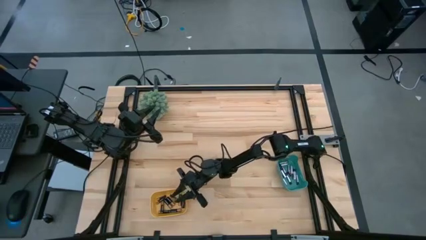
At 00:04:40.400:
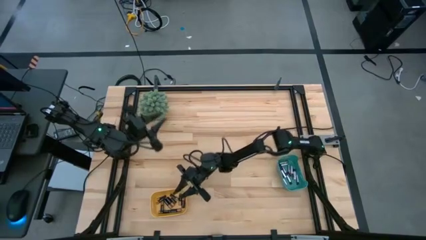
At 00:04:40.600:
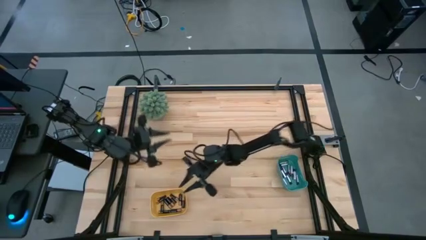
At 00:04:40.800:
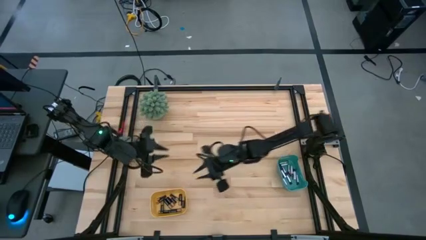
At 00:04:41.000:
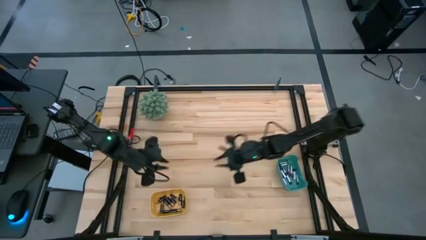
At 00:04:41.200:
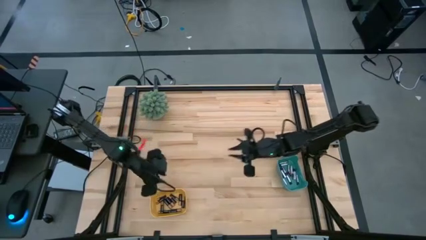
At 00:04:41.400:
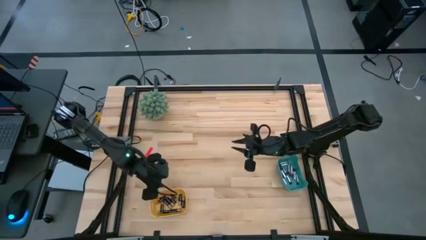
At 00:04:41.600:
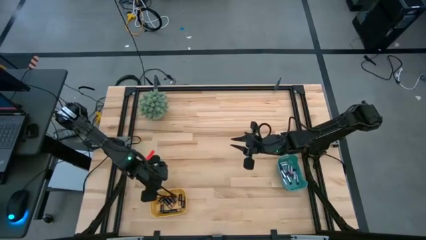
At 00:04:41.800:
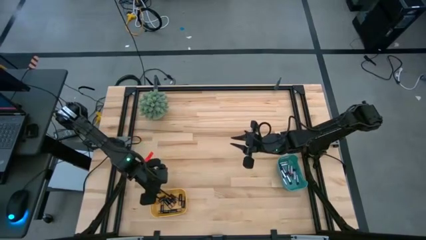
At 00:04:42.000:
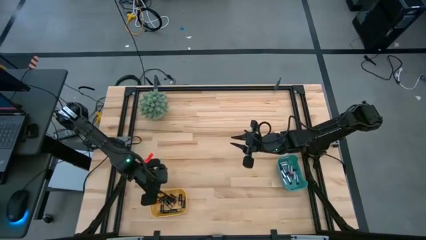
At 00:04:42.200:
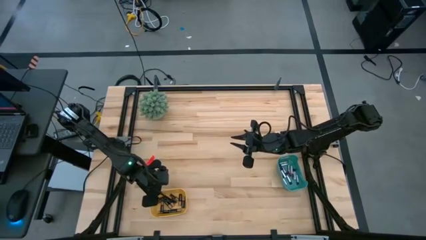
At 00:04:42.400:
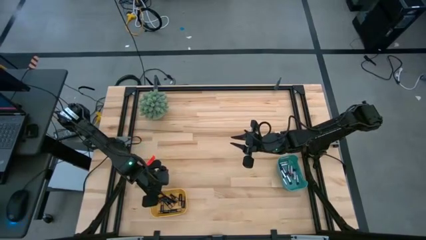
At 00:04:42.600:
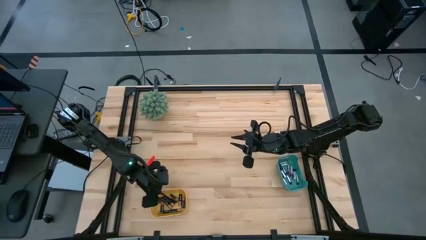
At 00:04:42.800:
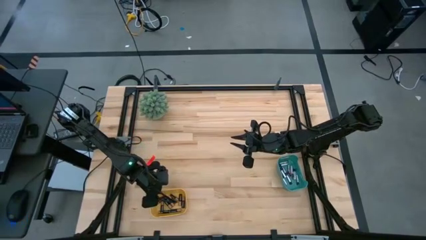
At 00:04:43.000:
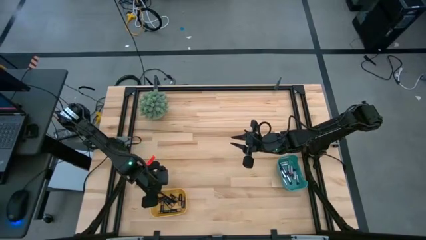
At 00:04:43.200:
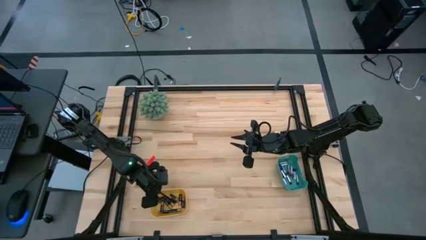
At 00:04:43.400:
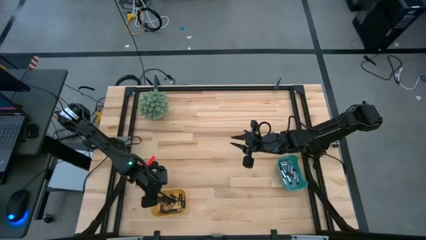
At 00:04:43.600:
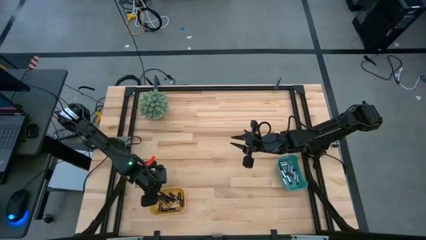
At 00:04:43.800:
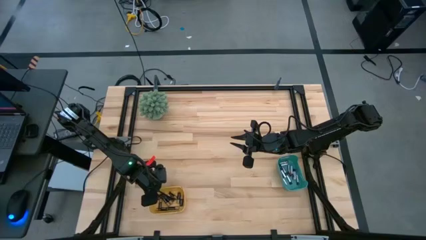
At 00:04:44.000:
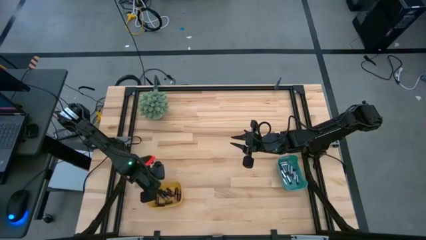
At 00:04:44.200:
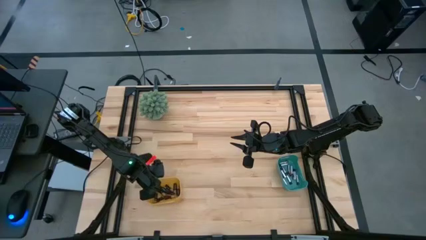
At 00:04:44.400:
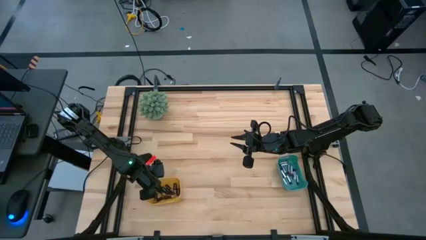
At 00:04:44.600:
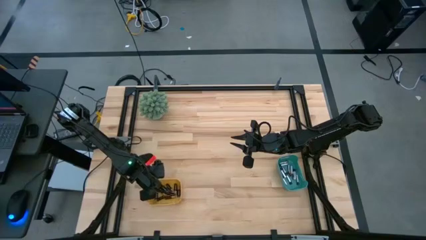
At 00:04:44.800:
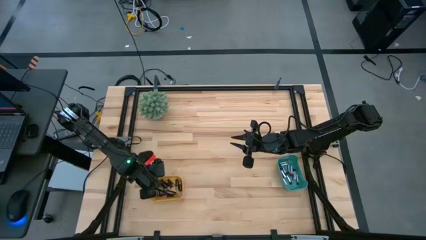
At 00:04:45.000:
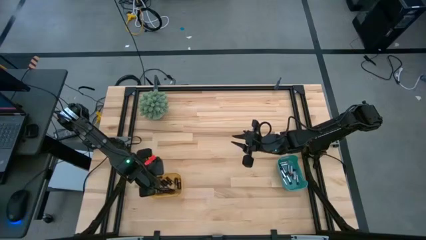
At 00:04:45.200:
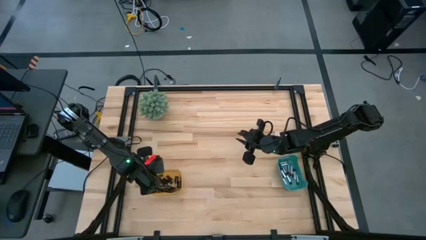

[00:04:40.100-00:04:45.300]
Task: Sort batteries
Adjust the yellow bin

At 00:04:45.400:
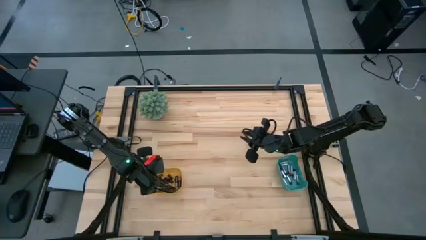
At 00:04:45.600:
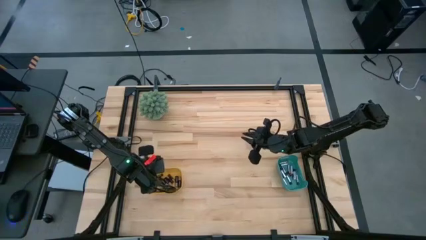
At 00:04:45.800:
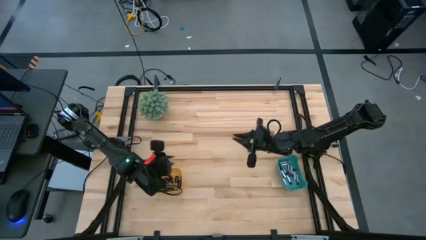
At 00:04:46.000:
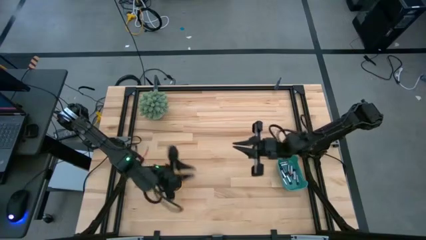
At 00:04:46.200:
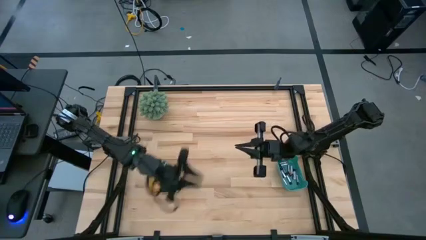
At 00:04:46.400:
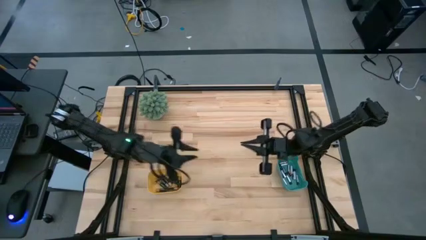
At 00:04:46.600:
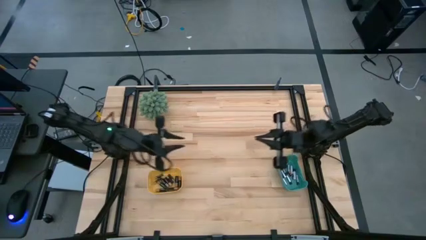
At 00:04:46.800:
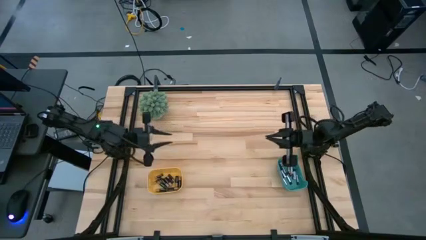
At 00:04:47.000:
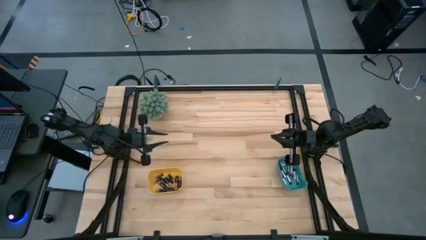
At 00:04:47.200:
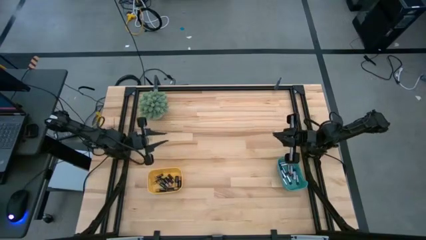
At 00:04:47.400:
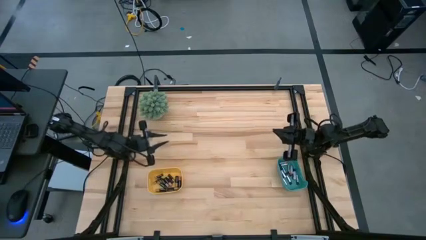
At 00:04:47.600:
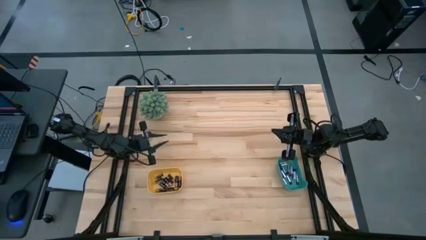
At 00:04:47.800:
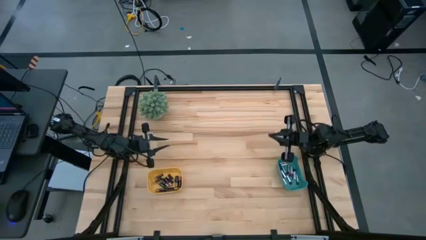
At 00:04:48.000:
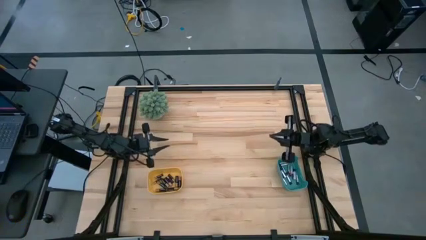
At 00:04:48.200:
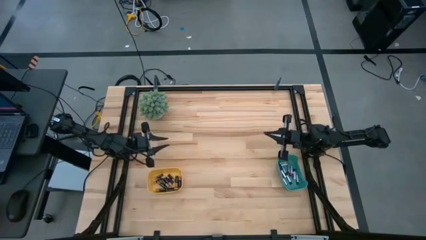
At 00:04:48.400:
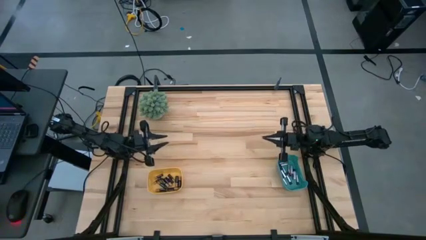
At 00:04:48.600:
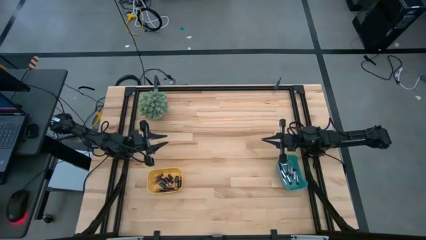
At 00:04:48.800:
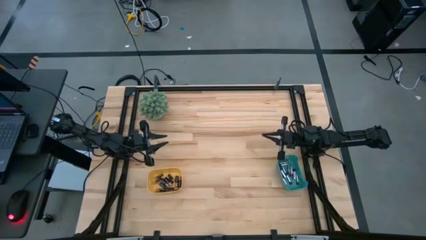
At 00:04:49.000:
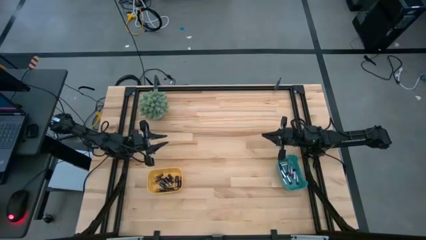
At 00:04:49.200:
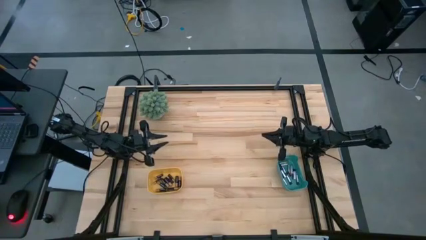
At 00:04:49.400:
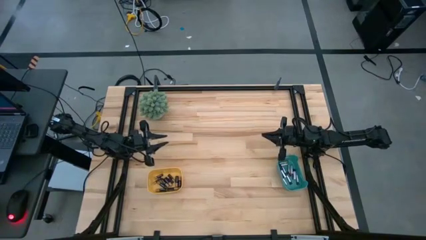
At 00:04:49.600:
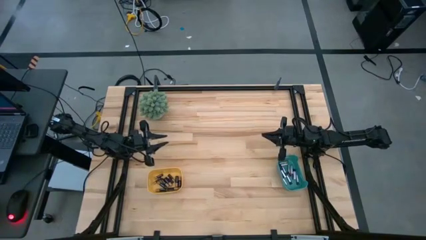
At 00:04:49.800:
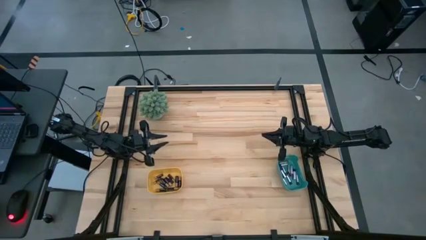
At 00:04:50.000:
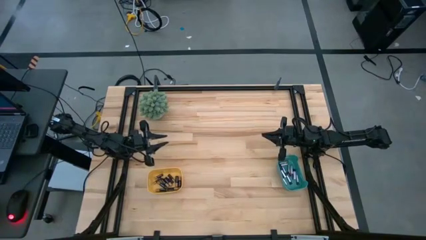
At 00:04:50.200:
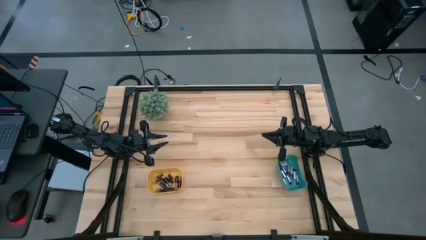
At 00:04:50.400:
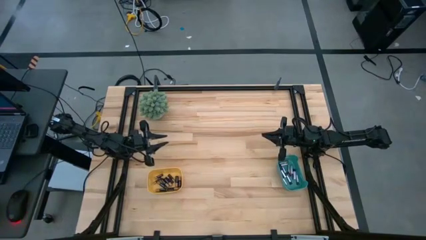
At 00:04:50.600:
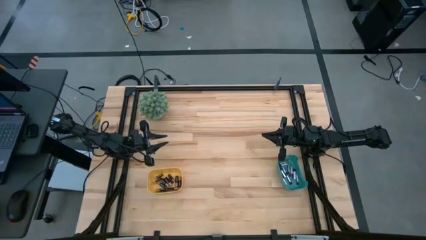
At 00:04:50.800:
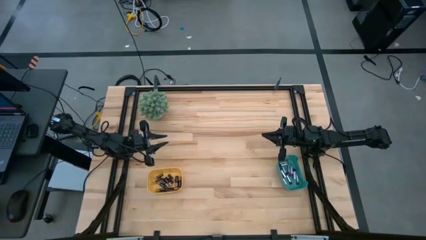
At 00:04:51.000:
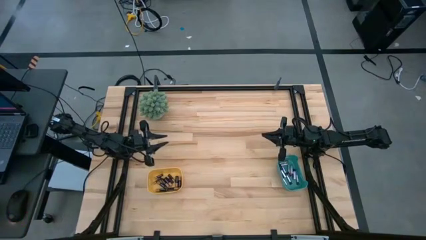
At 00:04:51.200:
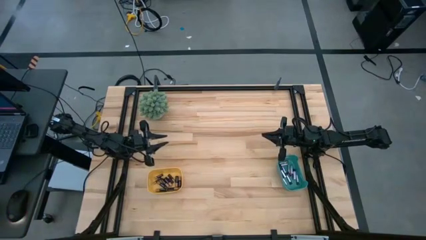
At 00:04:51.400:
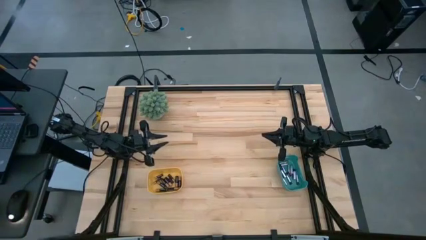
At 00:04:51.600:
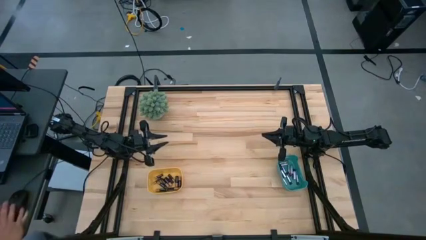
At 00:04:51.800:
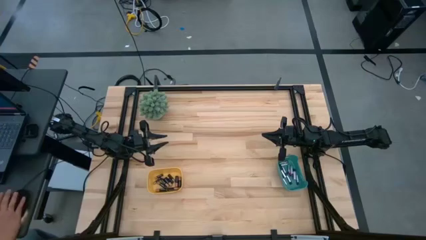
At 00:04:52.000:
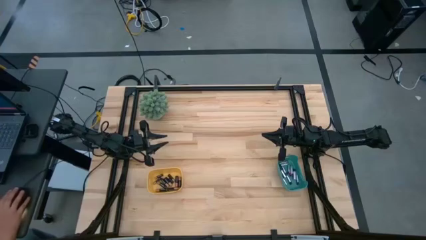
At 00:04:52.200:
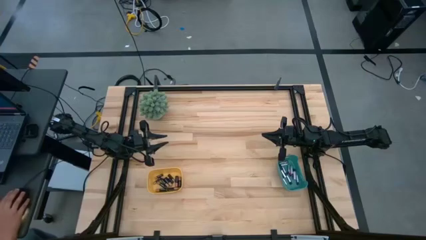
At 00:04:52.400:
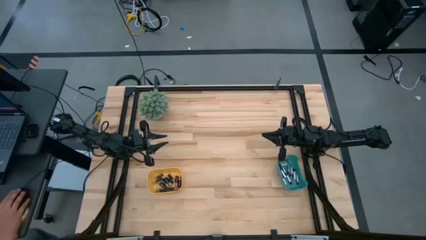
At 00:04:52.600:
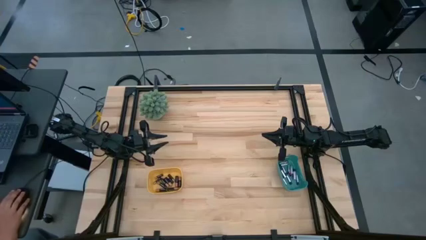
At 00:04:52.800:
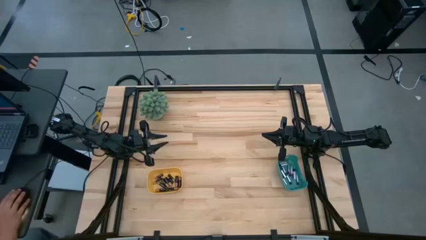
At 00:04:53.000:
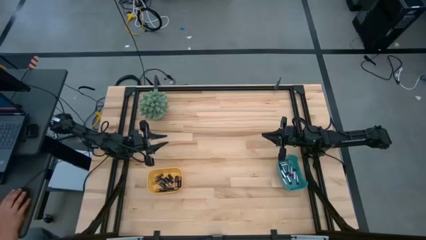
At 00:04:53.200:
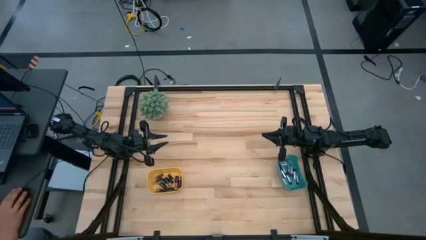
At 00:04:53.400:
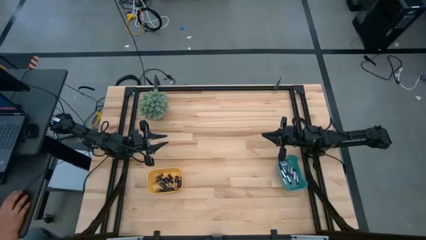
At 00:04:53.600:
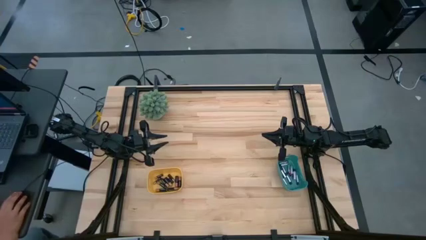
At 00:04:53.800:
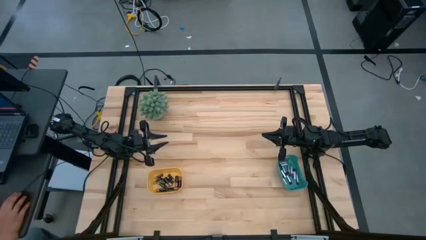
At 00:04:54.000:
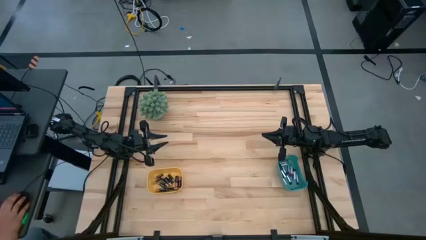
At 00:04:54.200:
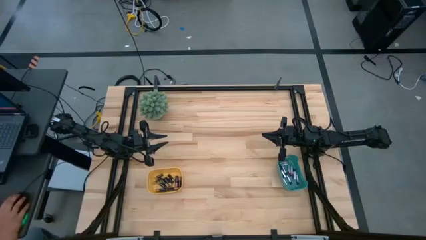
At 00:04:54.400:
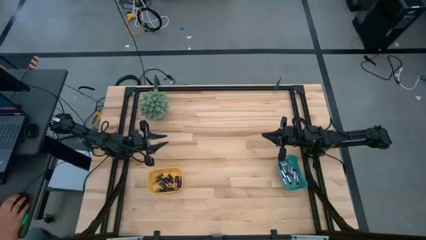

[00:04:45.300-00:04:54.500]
Return to Home Position
